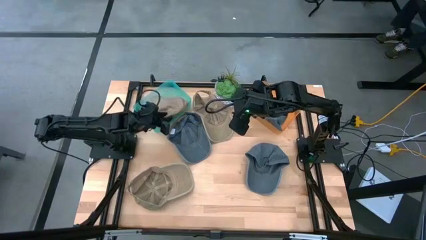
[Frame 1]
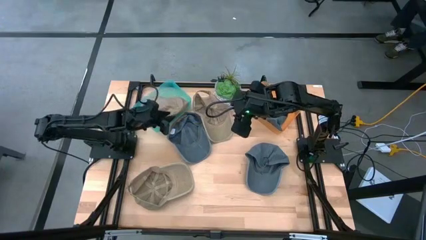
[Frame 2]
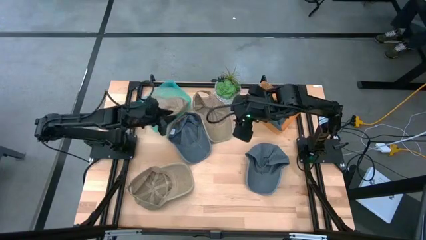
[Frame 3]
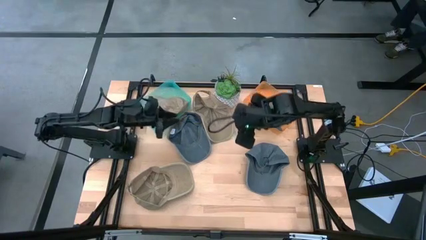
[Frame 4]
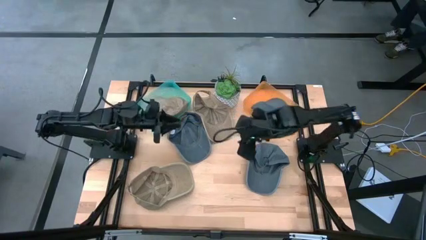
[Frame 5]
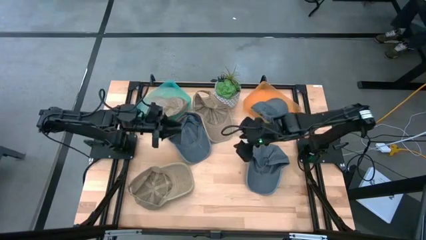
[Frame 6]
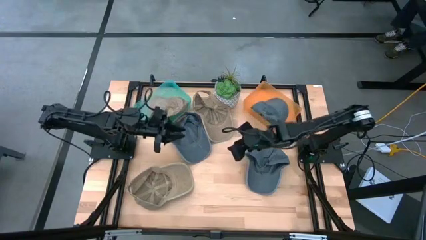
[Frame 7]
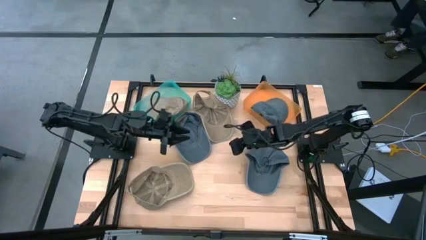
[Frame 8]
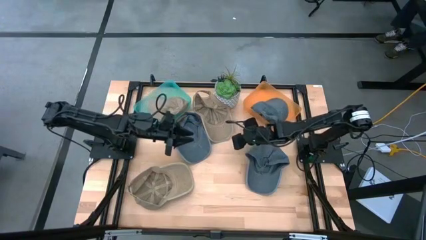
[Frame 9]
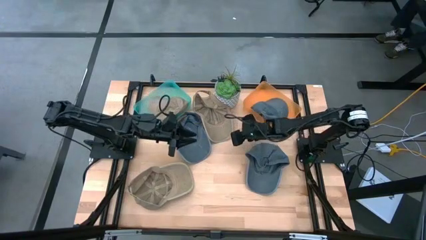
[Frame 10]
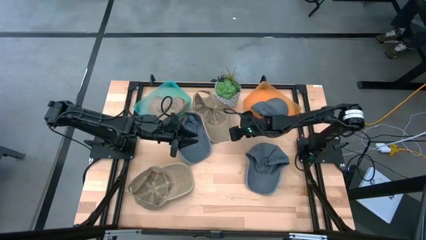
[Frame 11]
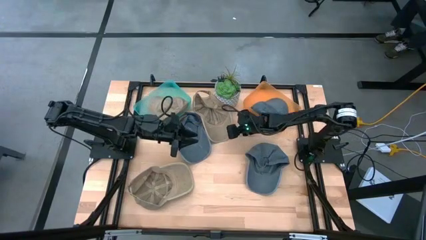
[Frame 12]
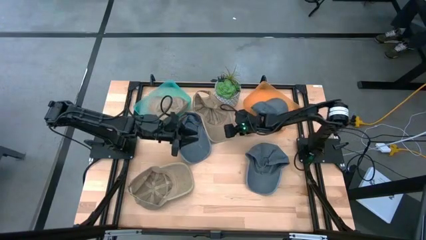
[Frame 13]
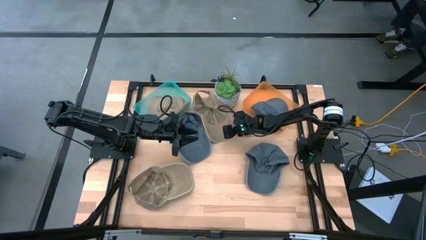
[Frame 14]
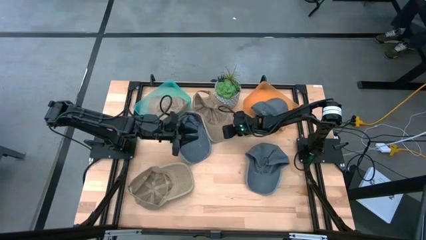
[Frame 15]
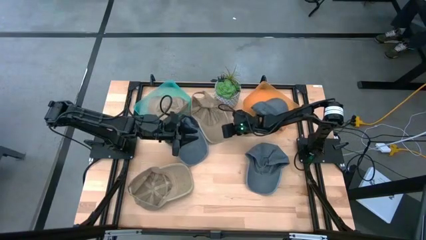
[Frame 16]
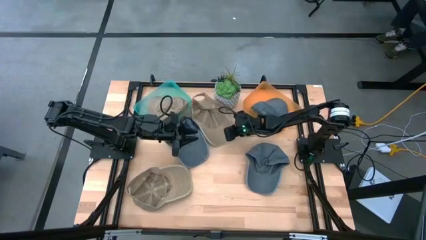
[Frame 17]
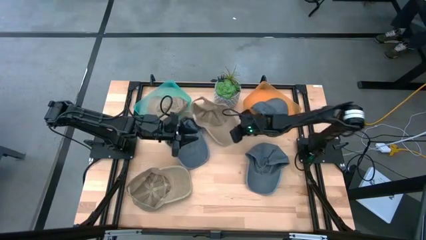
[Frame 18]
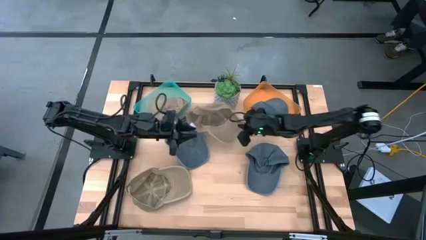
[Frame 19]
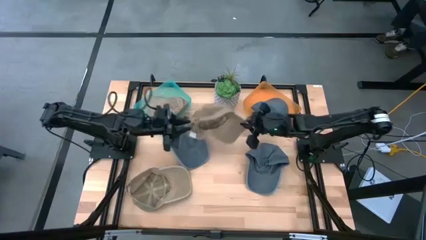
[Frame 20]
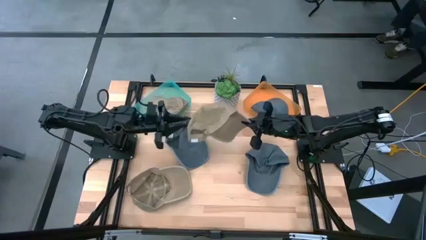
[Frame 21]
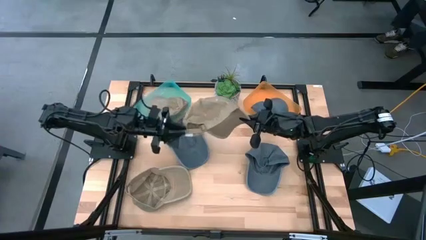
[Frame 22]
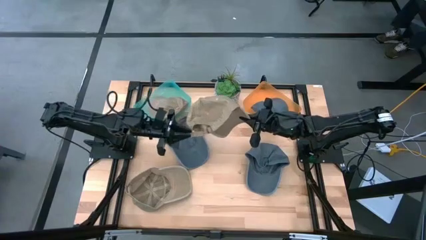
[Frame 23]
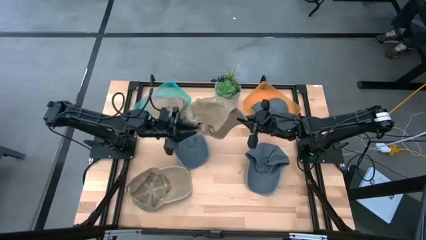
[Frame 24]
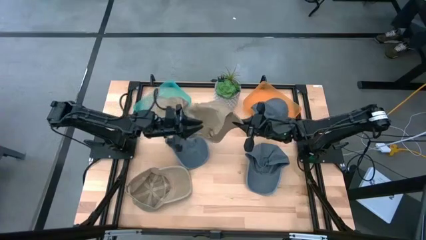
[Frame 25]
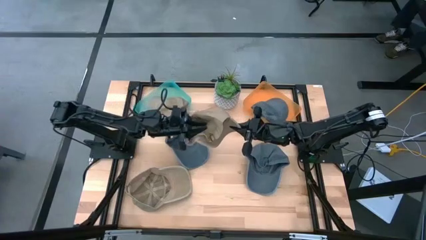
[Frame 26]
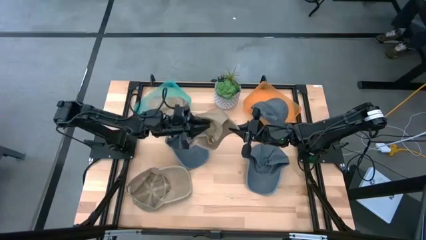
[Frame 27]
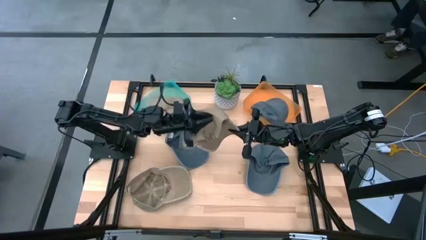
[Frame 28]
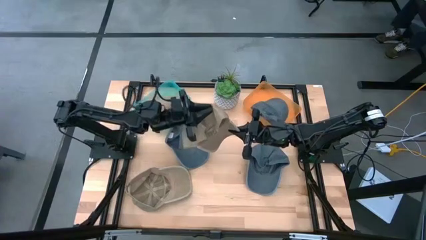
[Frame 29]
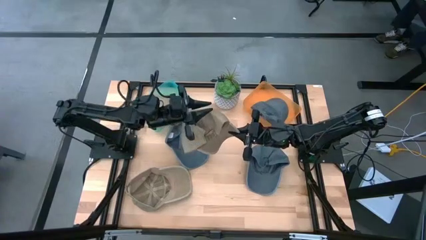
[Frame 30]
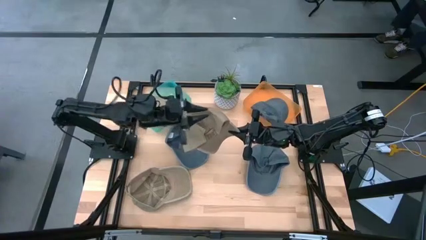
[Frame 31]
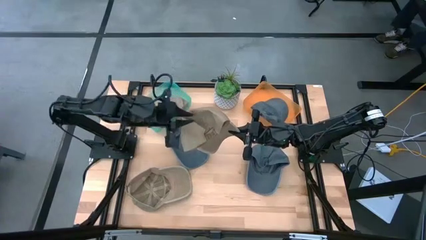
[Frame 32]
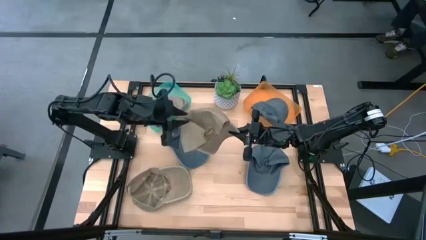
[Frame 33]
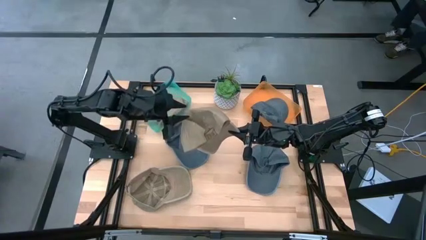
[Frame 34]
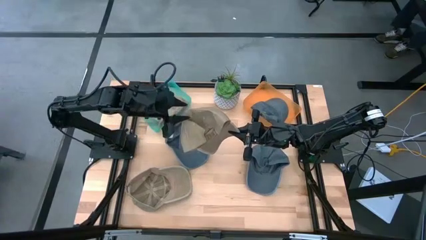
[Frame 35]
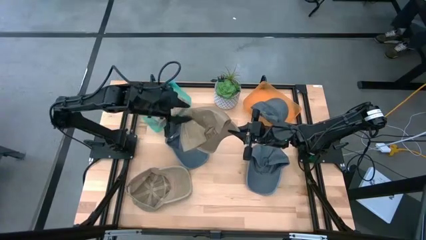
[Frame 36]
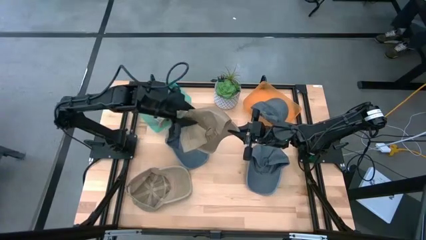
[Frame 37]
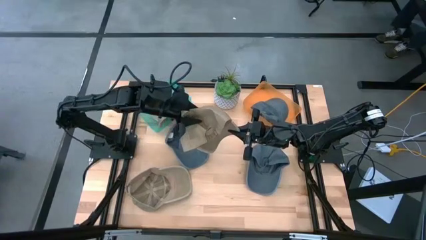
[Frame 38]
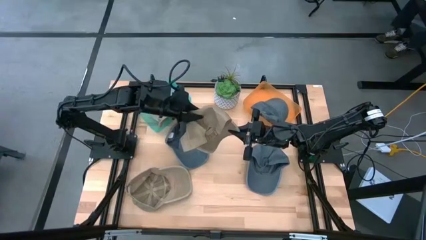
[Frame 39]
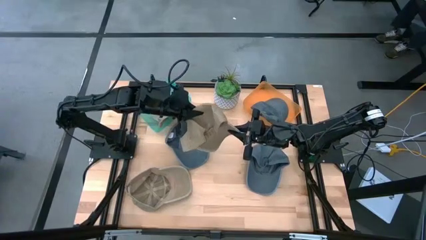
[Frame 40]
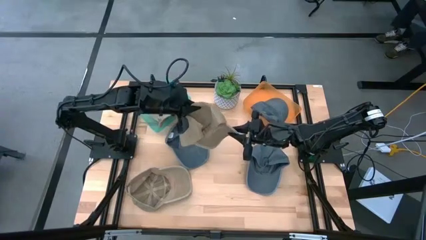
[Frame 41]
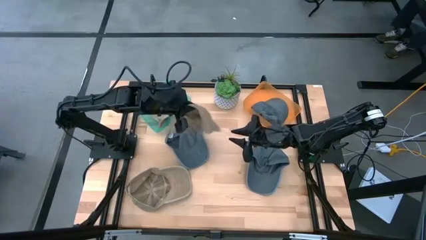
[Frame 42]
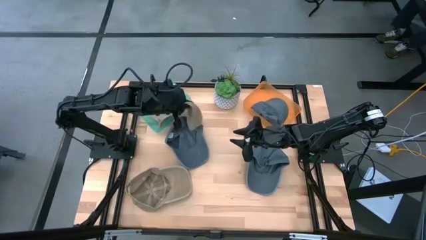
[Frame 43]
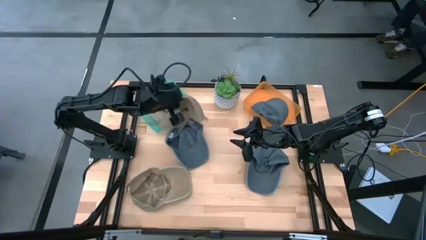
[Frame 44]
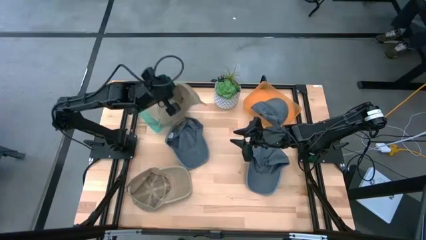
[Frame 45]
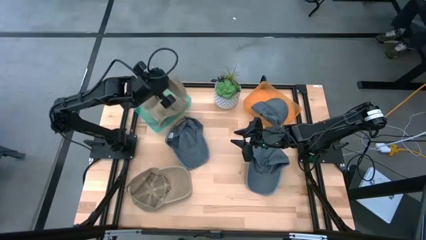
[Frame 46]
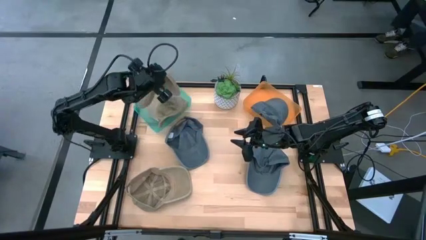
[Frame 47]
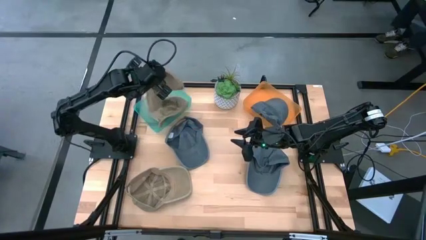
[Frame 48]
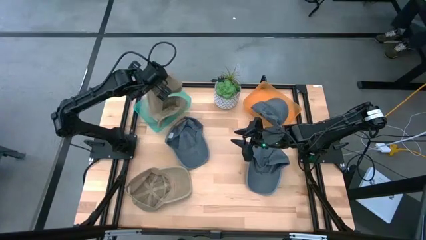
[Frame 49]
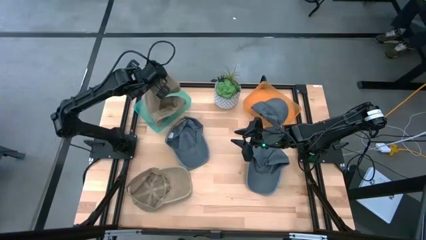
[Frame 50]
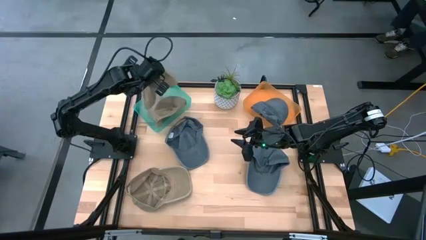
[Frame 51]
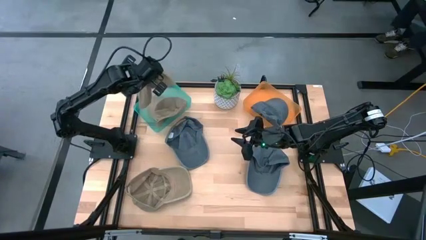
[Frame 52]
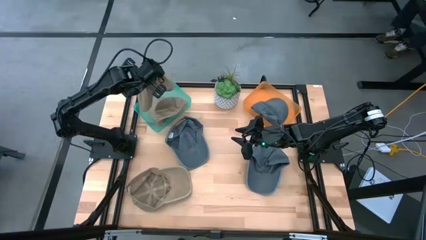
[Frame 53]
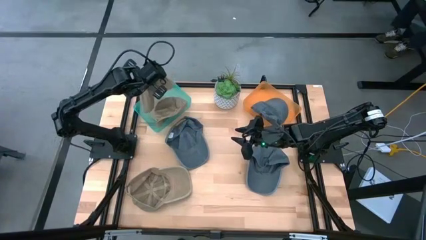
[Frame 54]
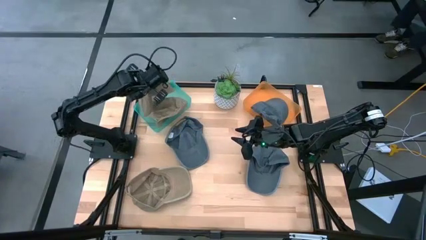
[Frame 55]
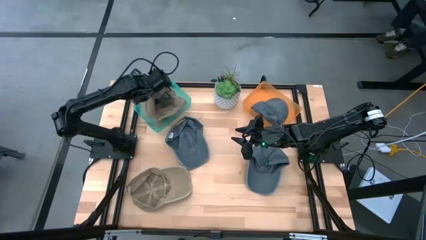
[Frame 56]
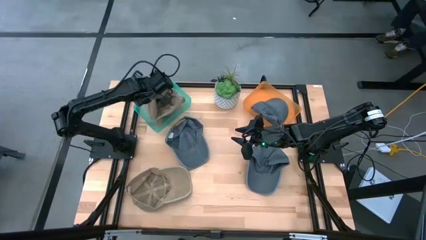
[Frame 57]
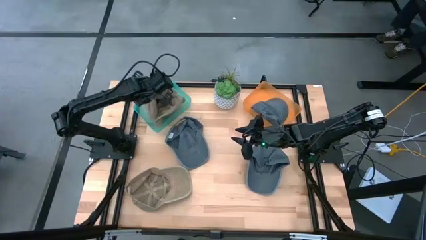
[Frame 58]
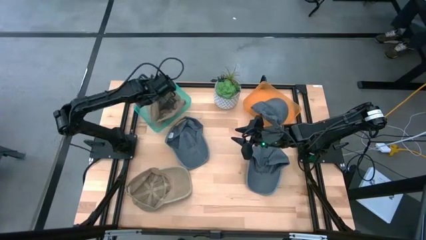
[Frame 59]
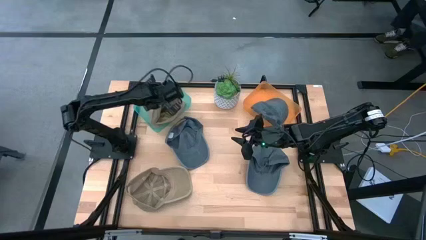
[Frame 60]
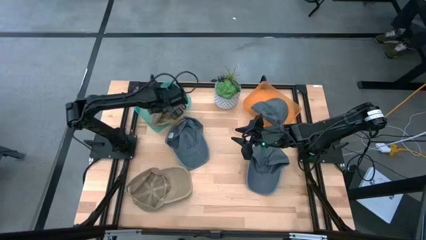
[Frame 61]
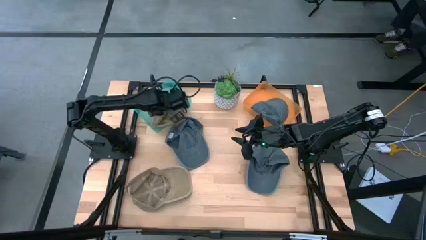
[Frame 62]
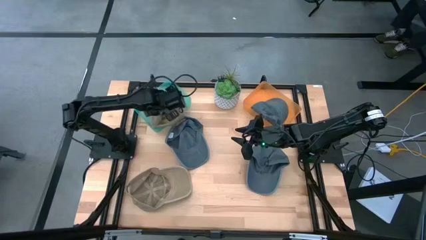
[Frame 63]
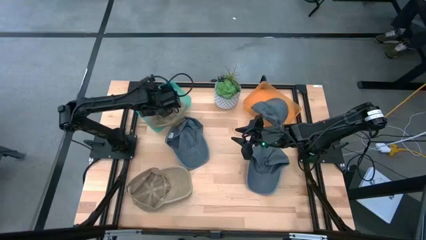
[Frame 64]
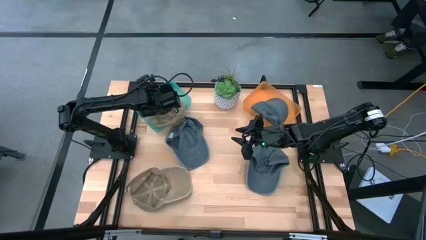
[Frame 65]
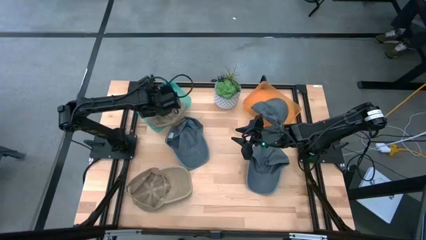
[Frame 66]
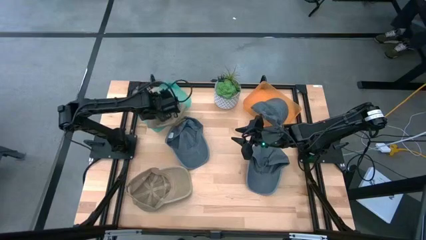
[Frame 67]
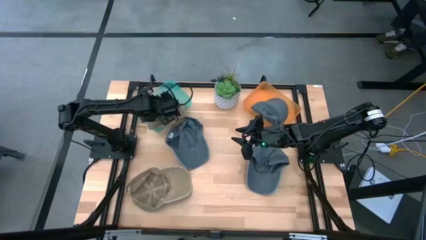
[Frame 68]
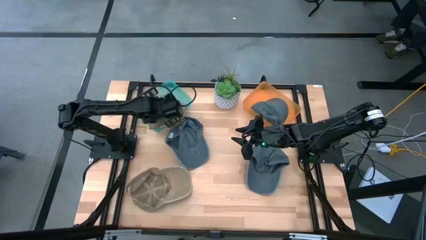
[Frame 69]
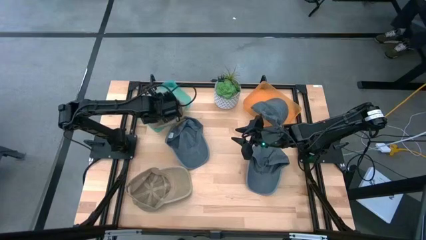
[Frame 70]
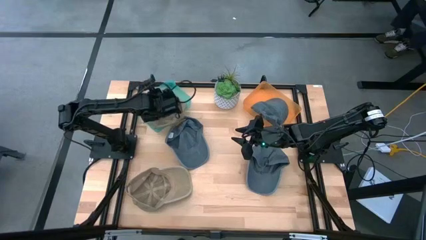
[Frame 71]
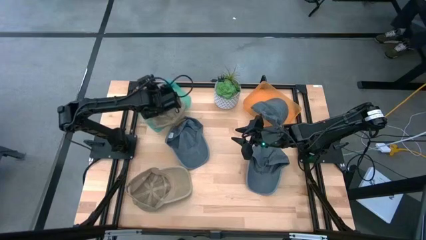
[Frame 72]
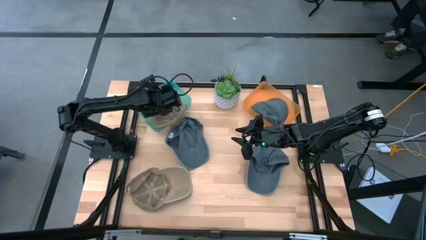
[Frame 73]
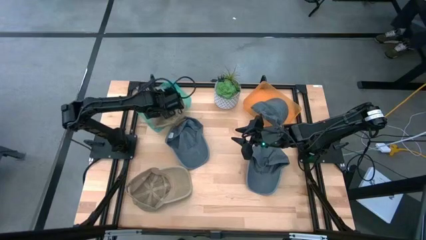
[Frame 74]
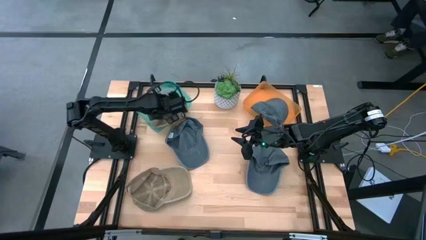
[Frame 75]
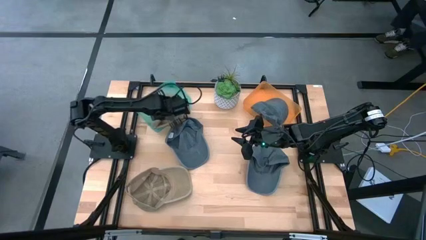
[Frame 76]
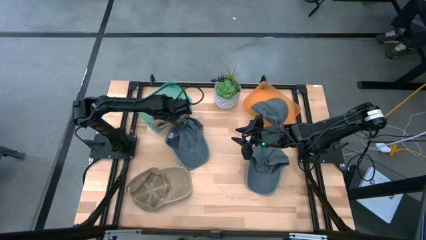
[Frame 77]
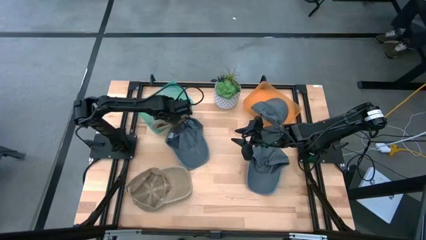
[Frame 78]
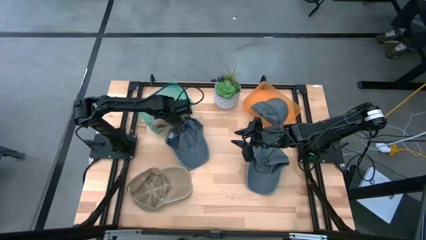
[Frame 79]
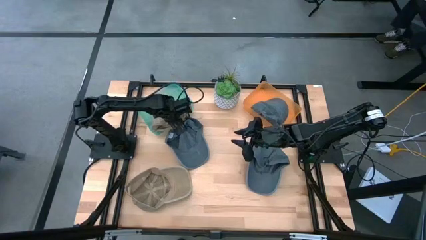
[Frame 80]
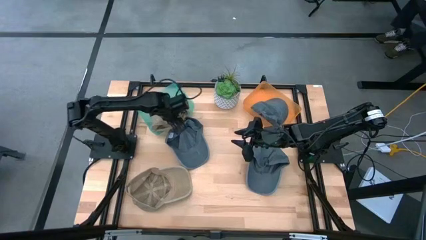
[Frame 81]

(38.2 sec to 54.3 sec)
Task: Pick & Place hat
Put the top brown cap into the green bin
